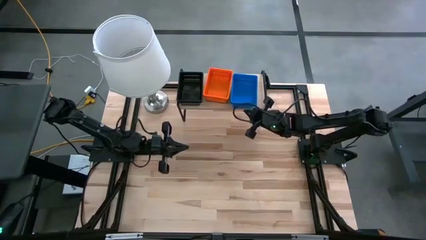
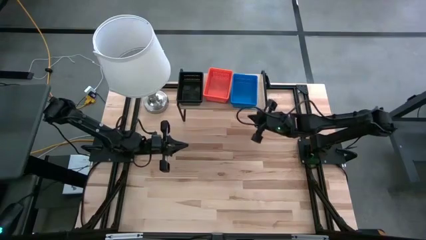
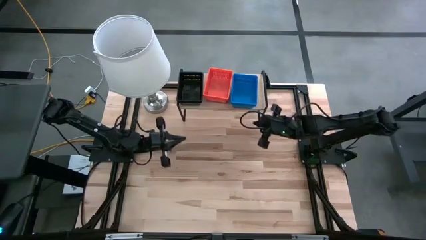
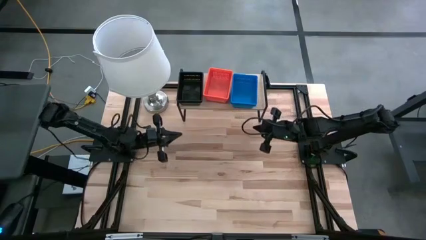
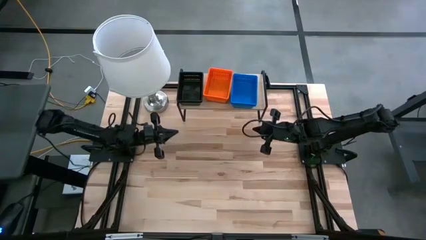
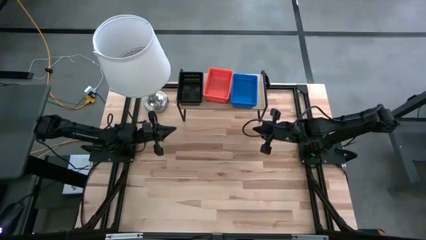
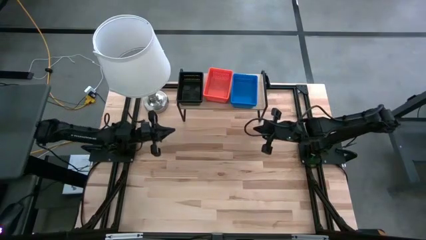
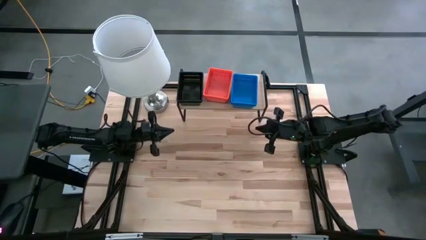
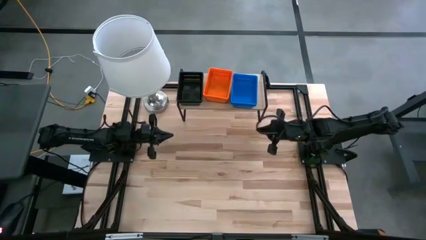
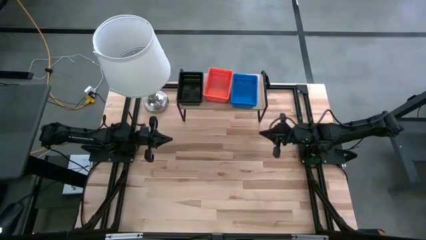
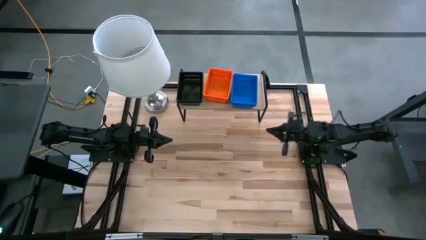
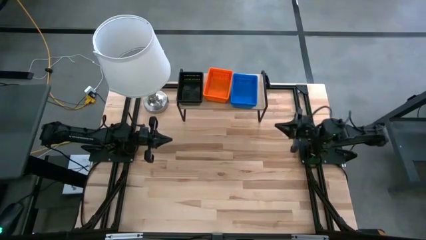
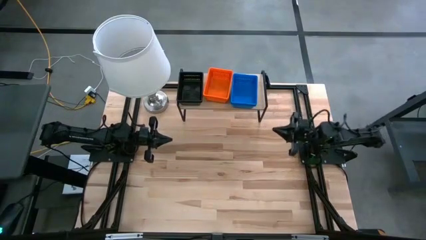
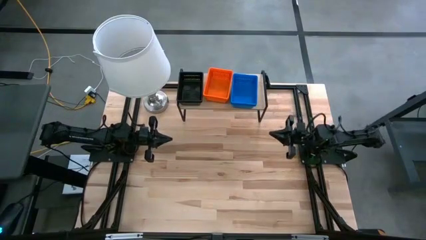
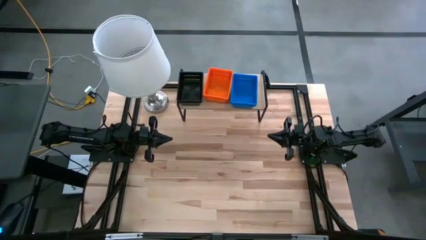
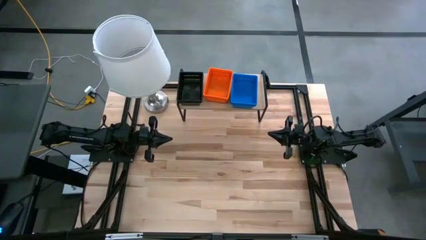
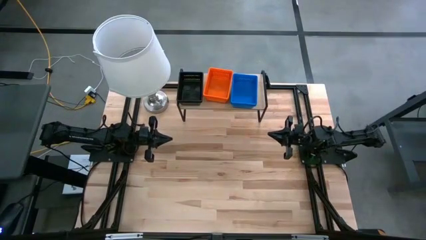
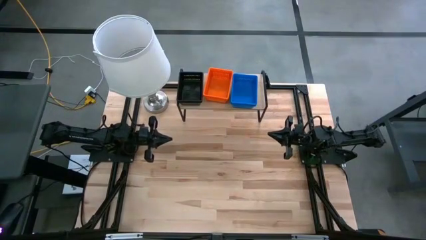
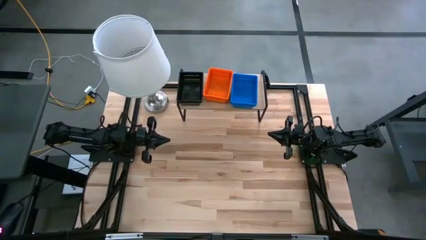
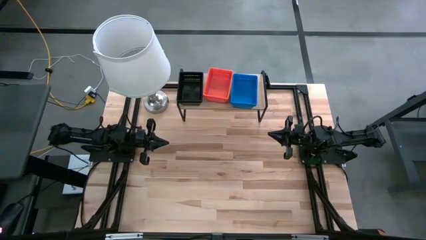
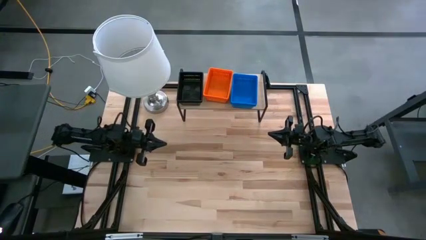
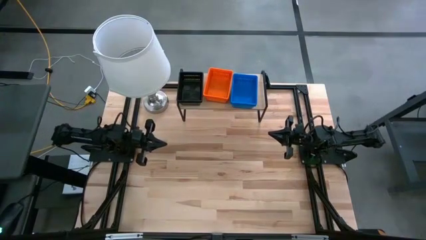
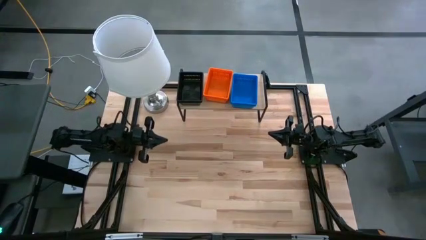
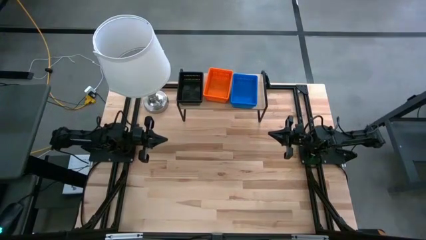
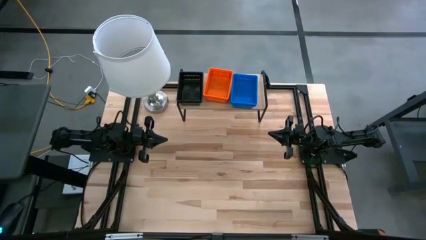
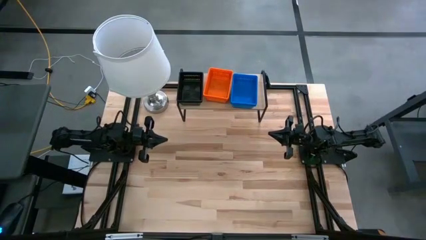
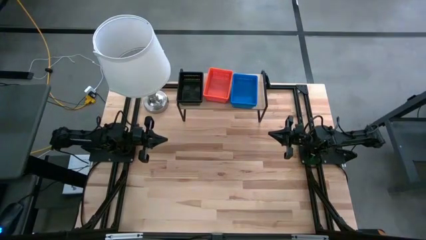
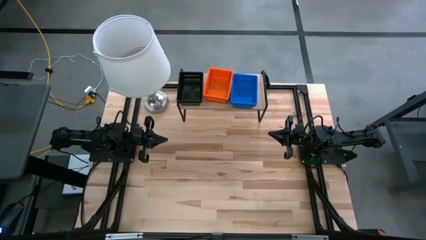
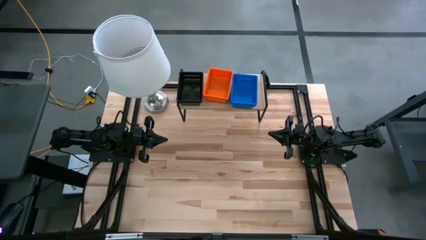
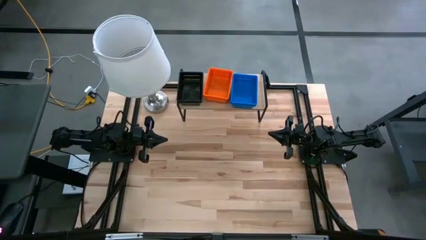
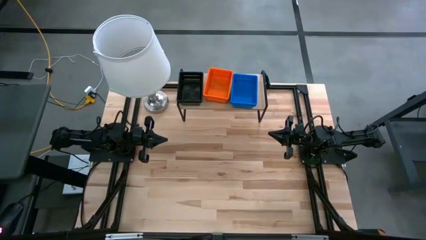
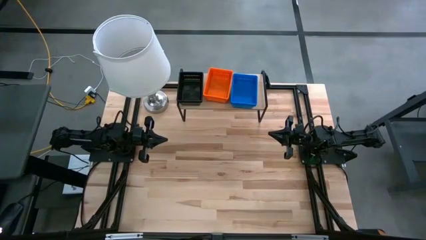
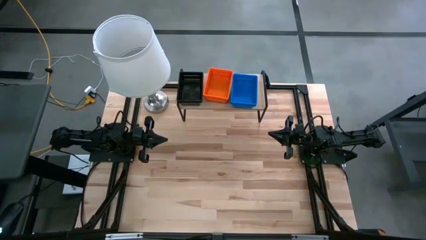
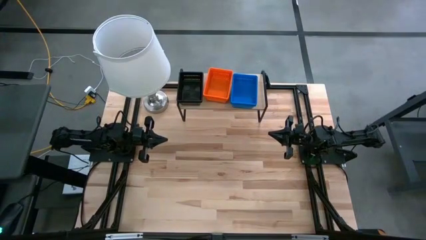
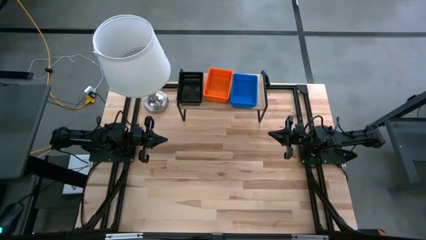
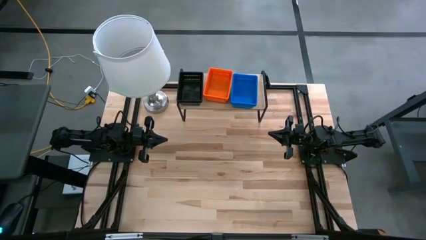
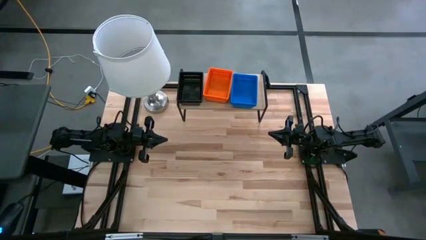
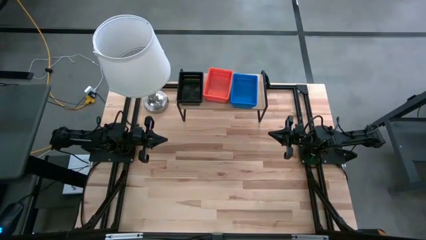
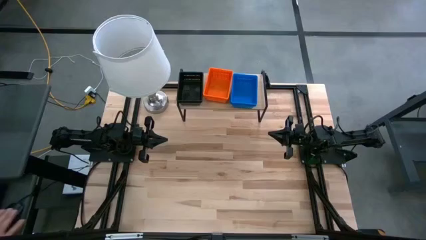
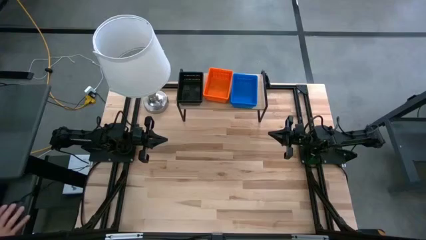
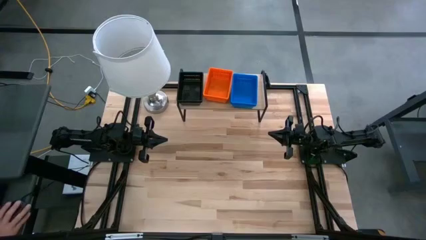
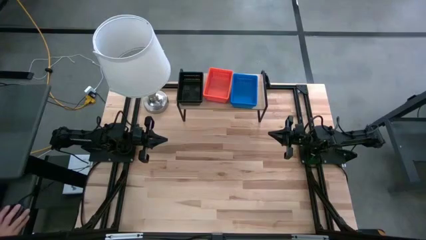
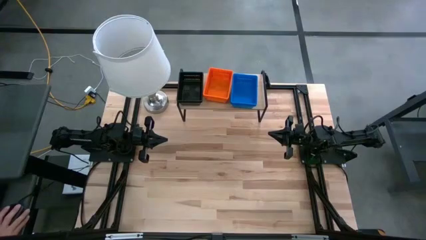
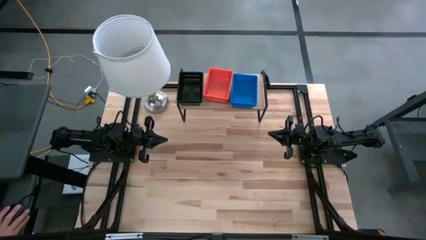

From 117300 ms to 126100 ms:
Task: Stack baskets on shelf by color
Return to Home Position

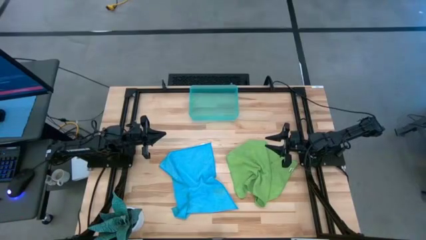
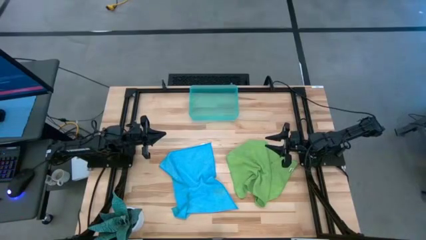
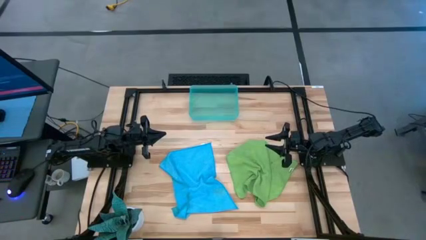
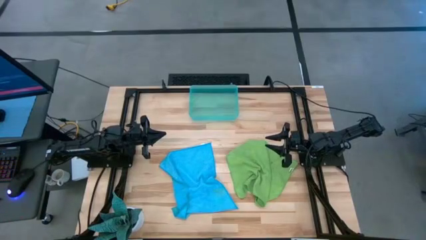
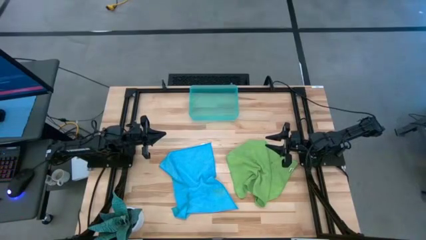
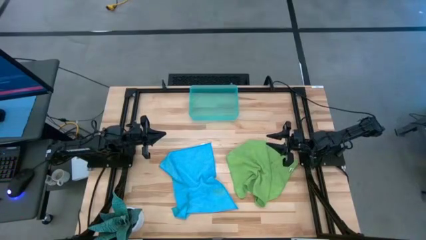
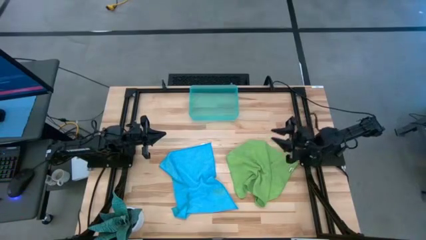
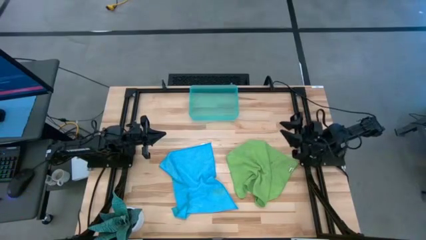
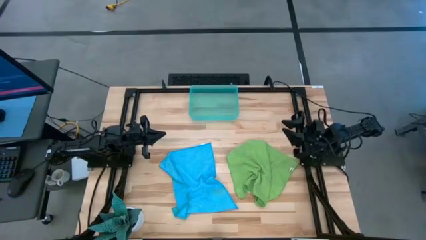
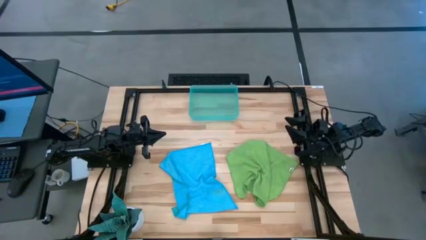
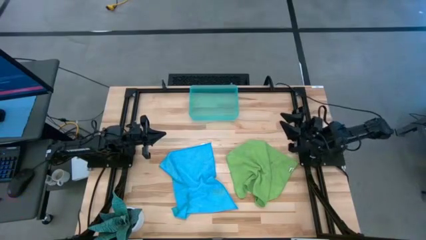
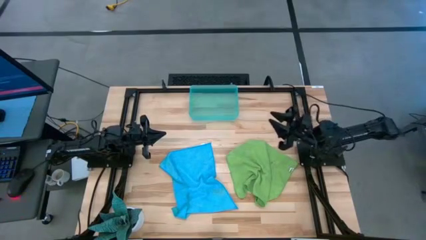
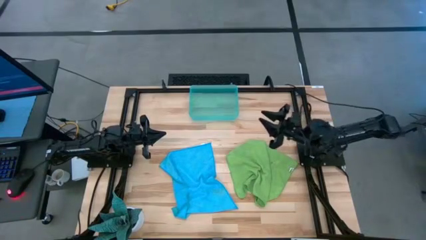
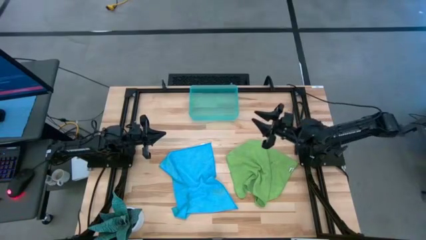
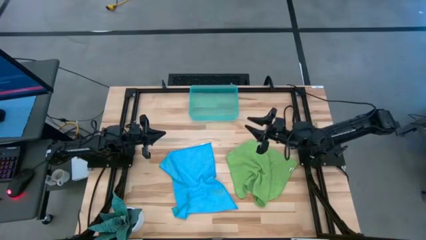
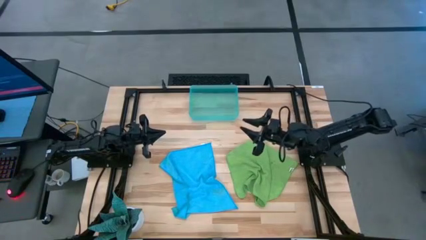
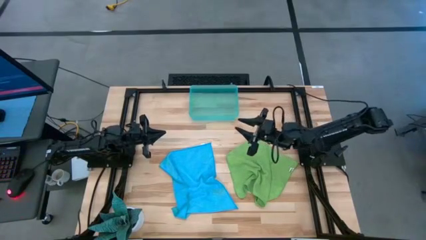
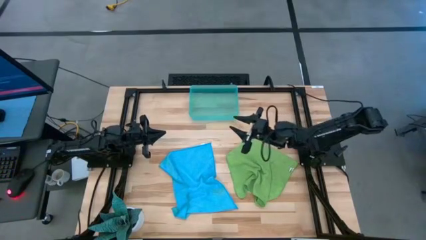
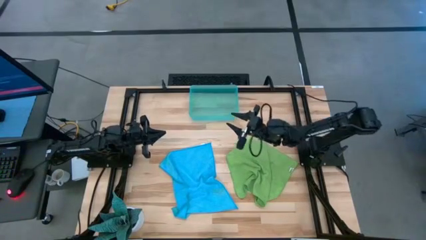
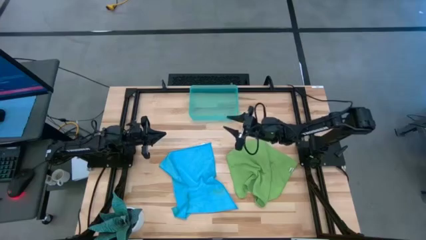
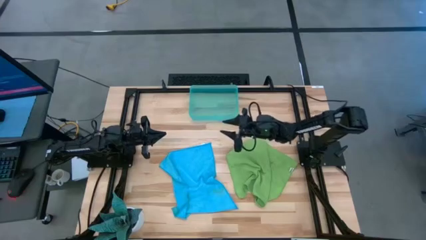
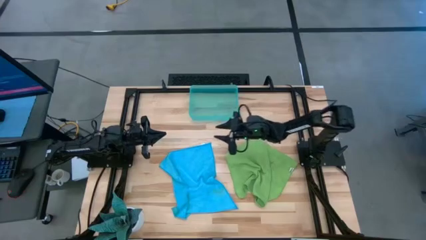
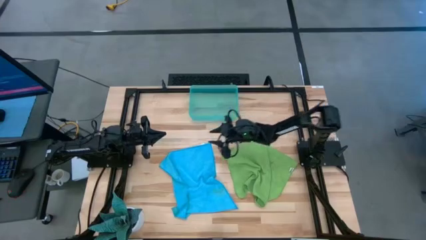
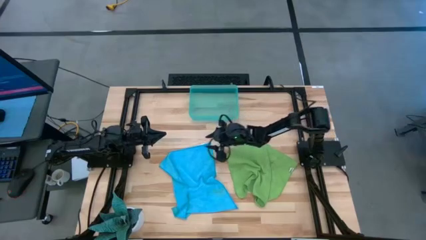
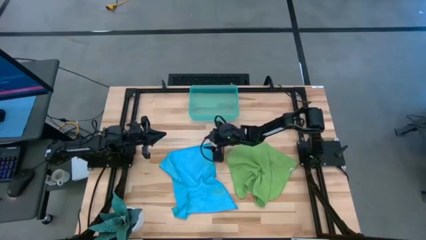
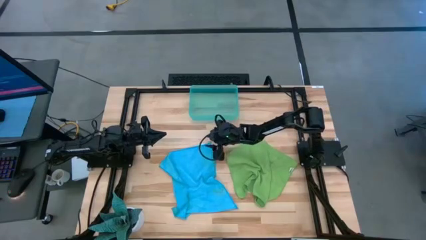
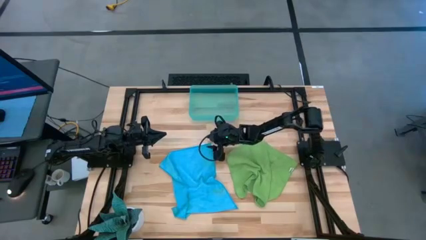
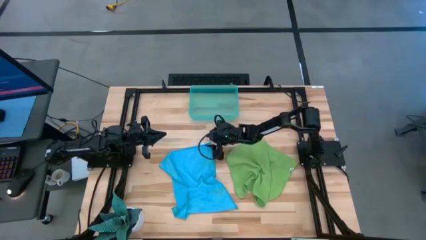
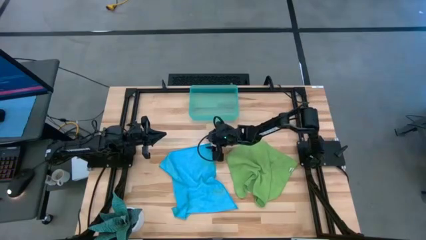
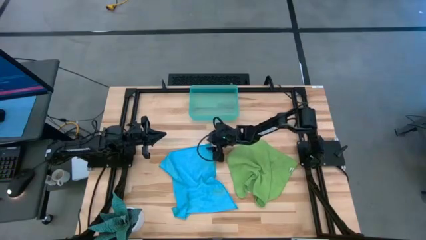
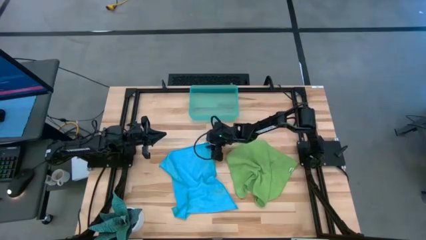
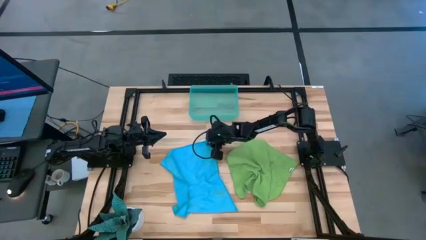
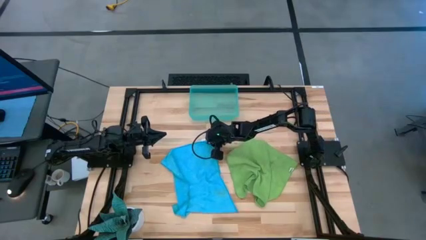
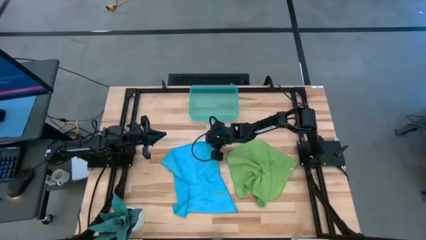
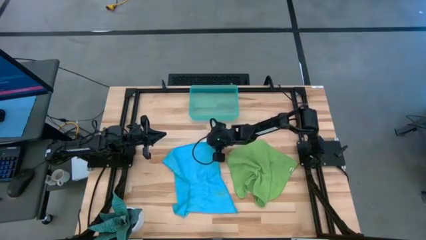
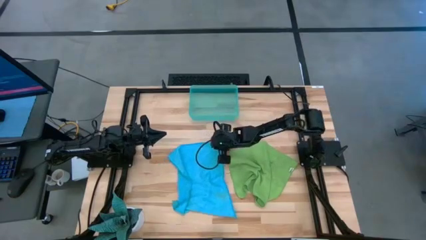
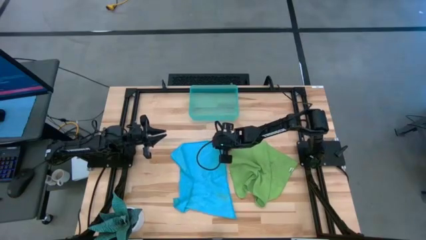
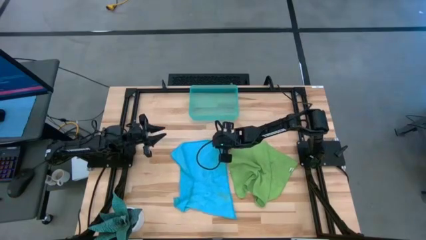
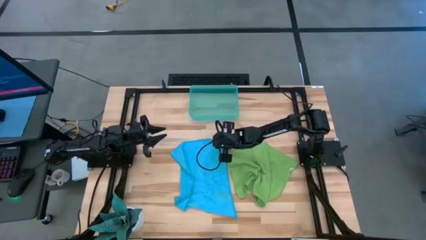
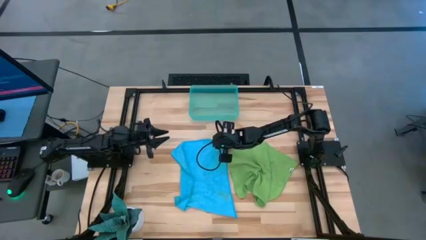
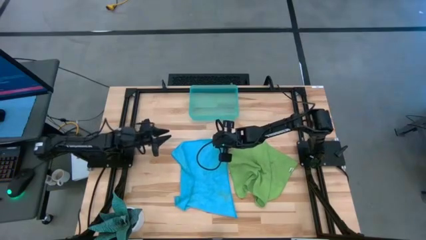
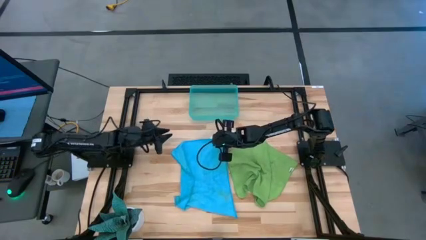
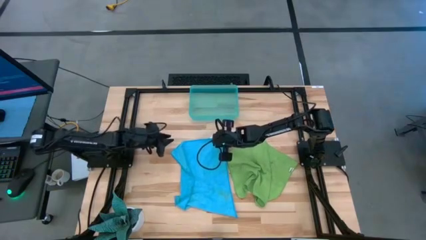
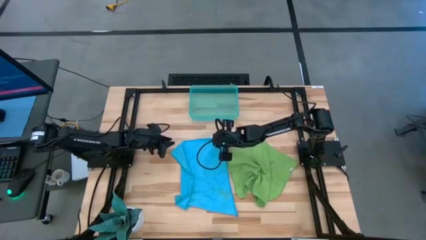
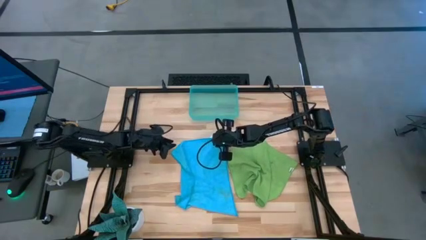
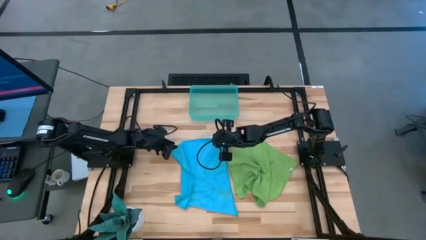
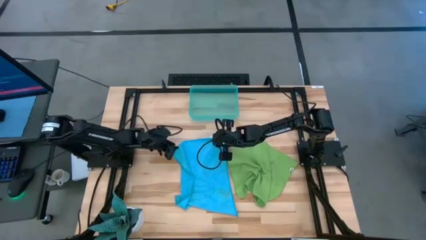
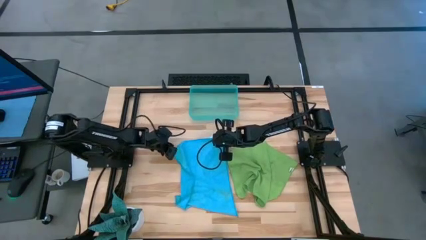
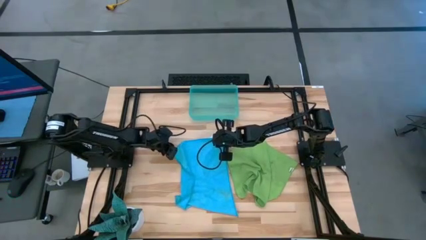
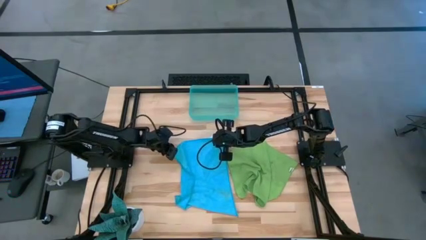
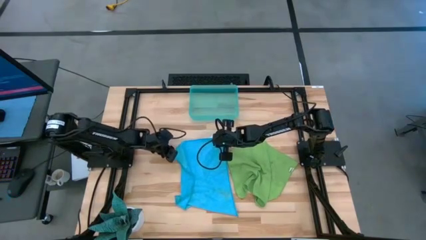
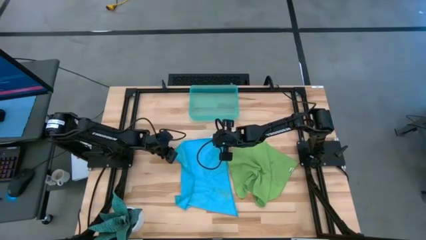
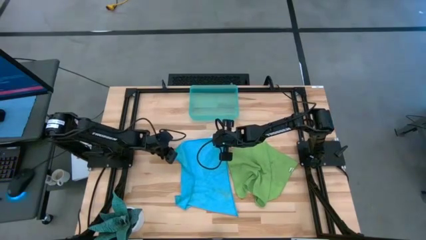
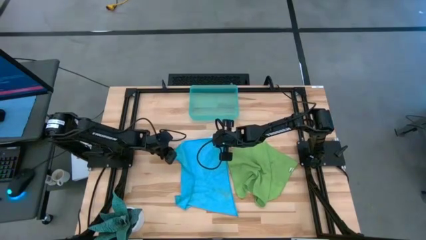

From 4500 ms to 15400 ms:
Task: Roll microfiber towels into tight, uniform cylinder then place into a basket
Fold the blue microfiber cloth
